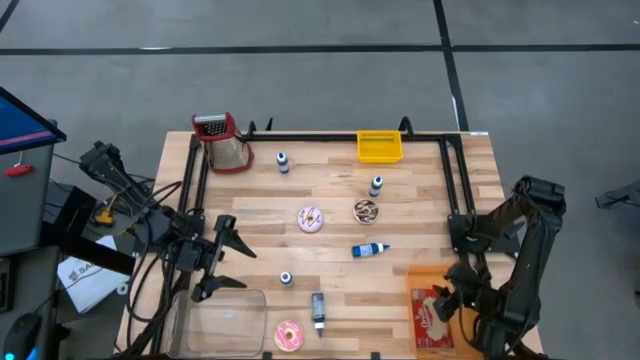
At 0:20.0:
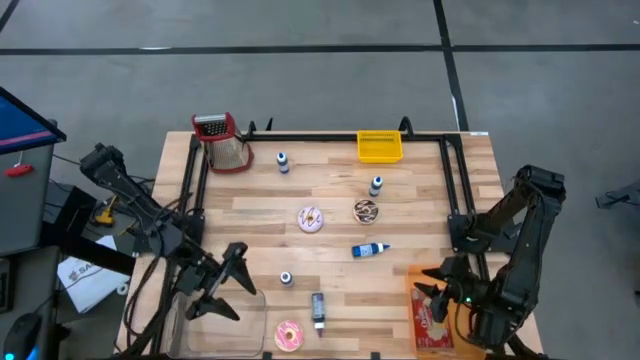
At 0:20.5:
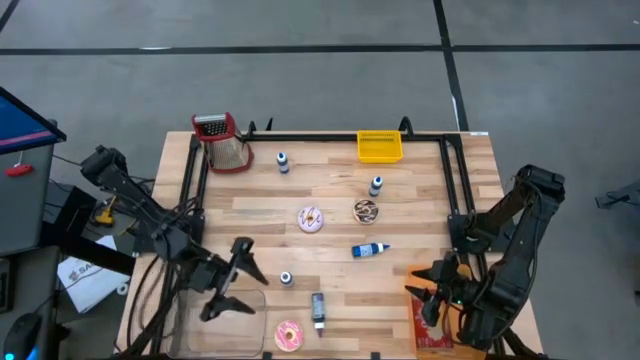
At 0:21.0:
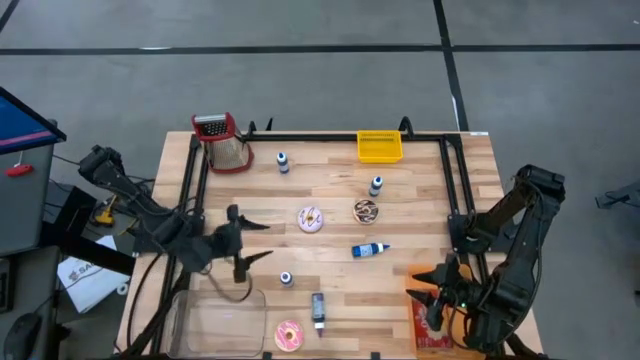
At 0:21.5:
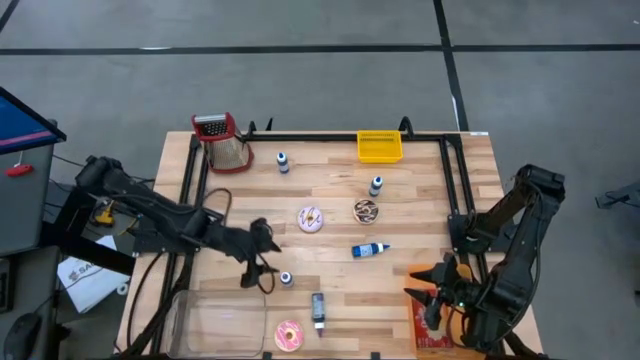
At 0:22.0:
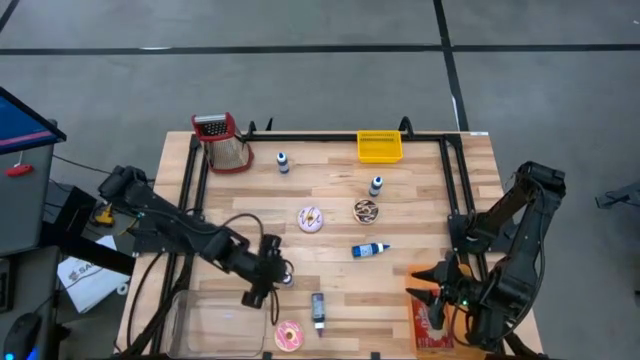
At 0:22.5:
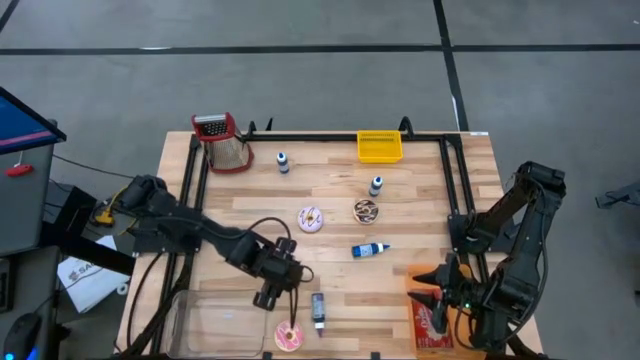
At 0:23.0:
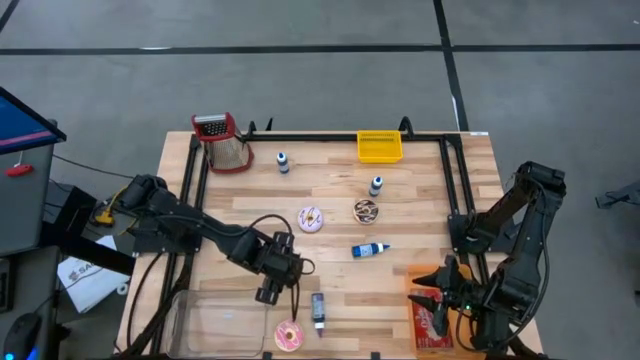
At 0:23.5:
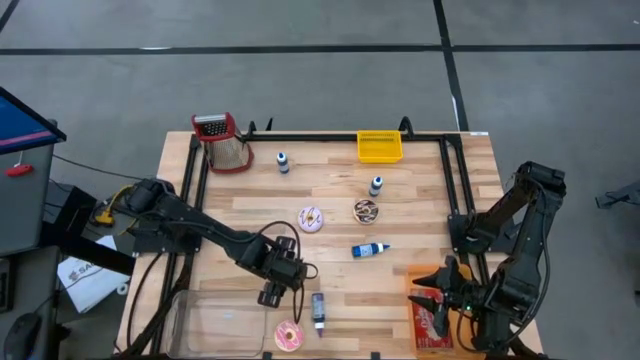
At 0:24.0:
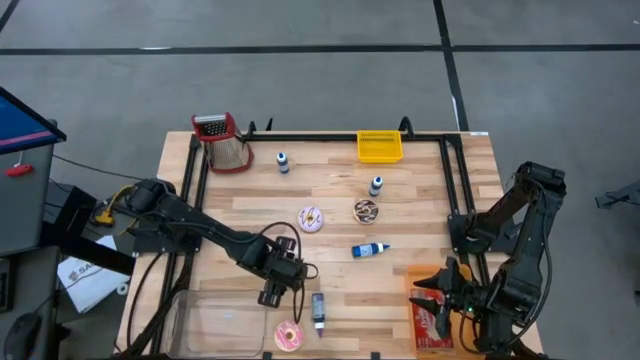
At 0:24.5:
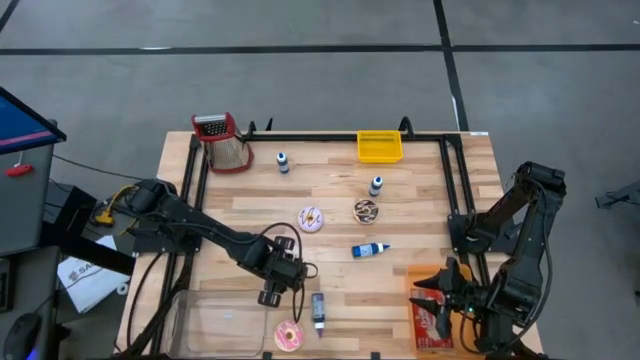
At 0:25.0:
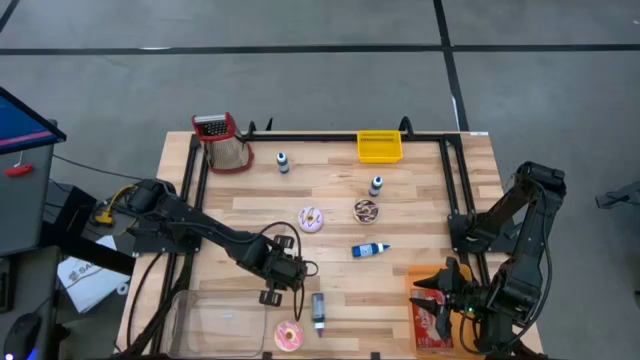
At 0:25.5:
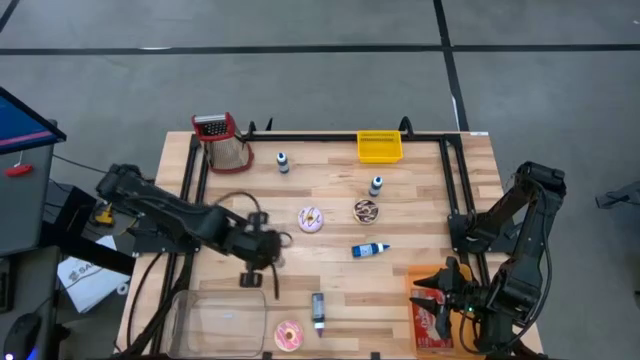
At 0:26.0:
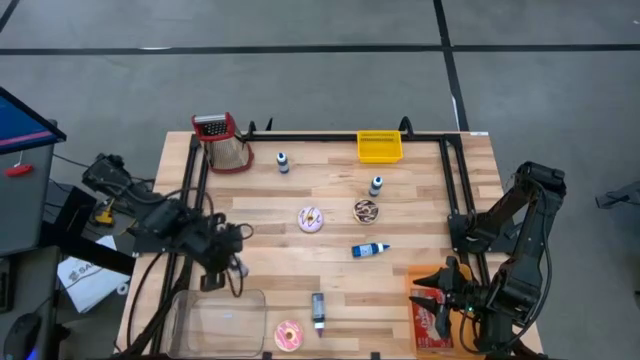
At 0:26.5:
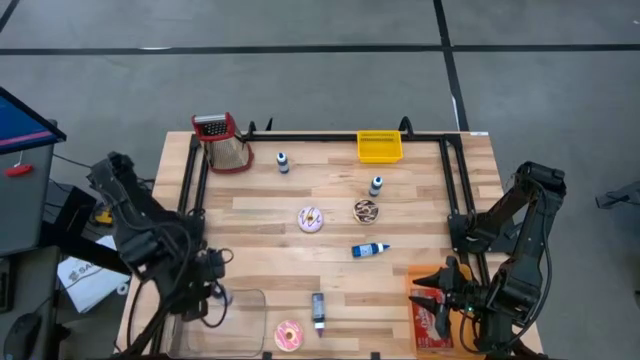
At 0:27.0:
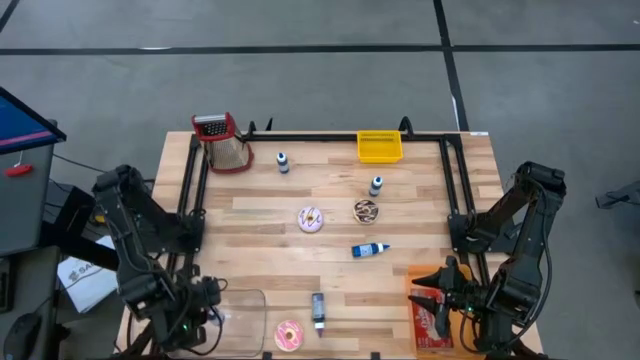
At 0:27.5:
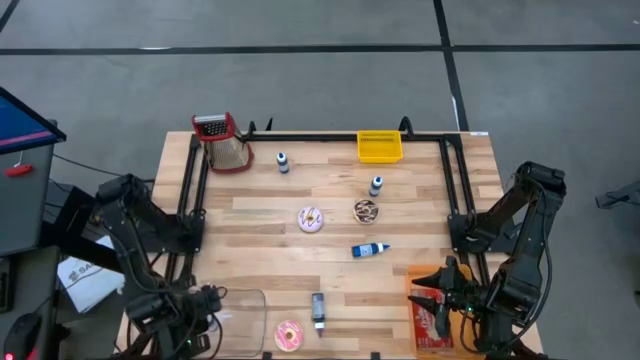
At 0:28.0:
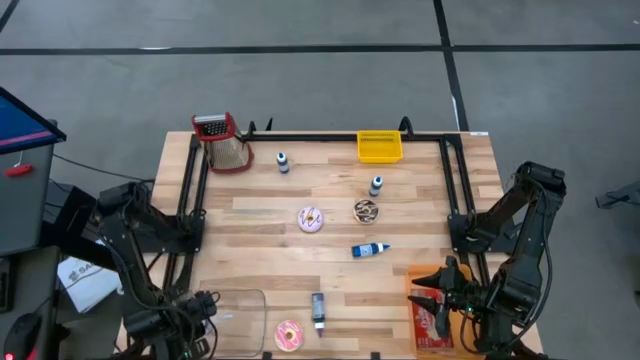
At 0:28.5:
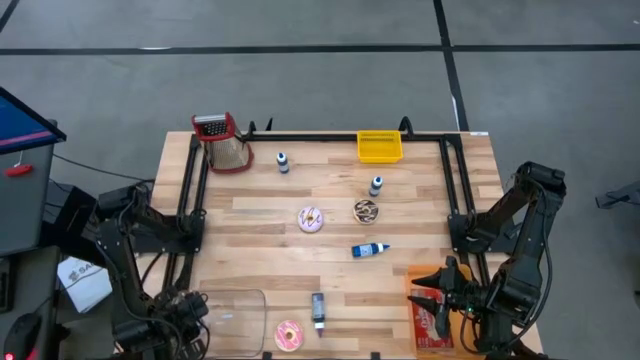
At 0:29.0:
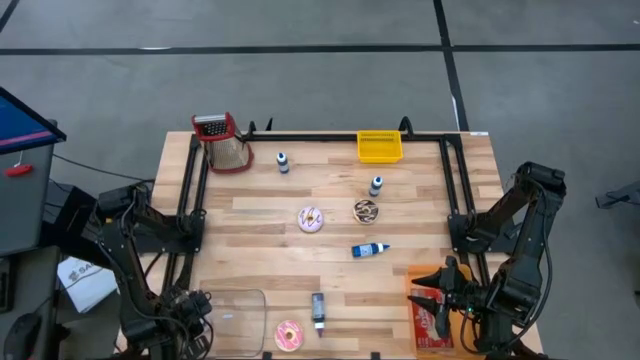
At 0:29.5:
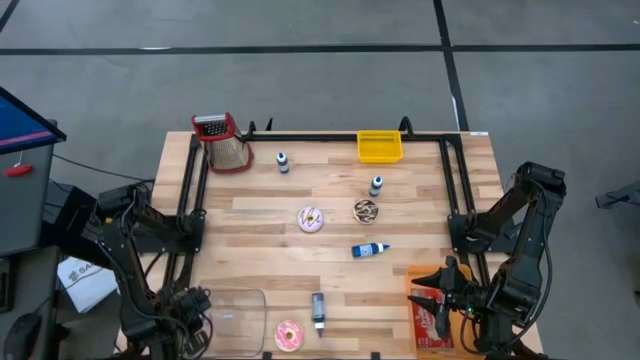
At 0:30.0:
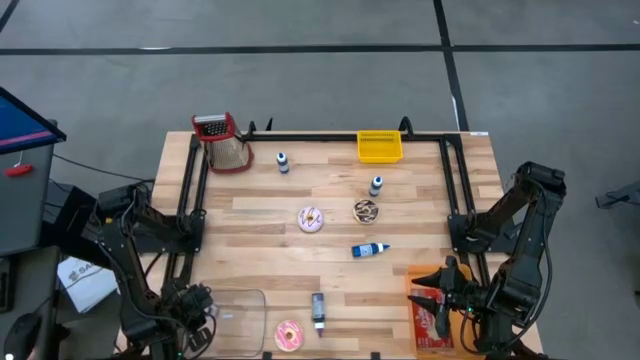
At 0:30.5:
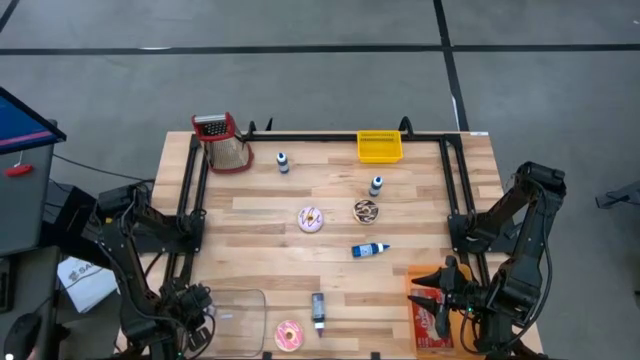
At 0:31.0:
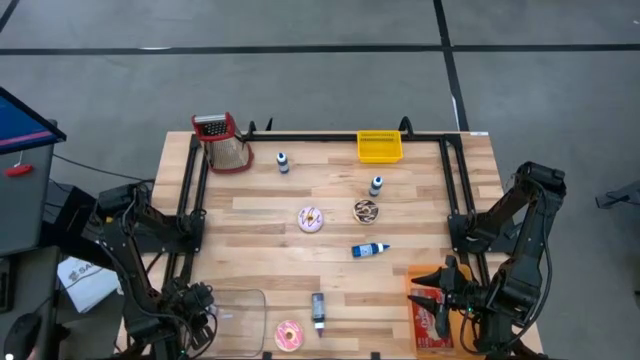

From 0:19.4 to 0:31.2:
Put the top violet food coloring bottle into the transparent bin

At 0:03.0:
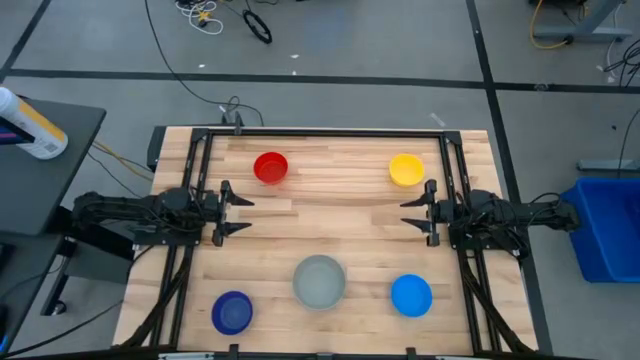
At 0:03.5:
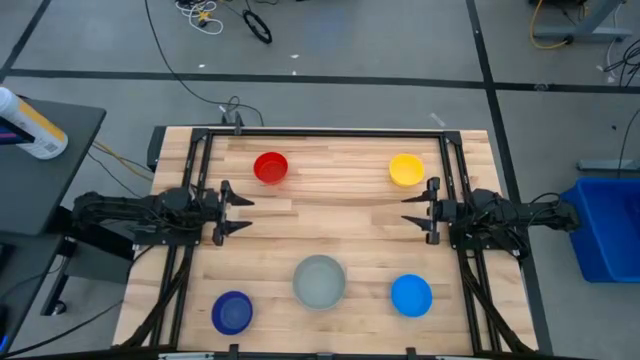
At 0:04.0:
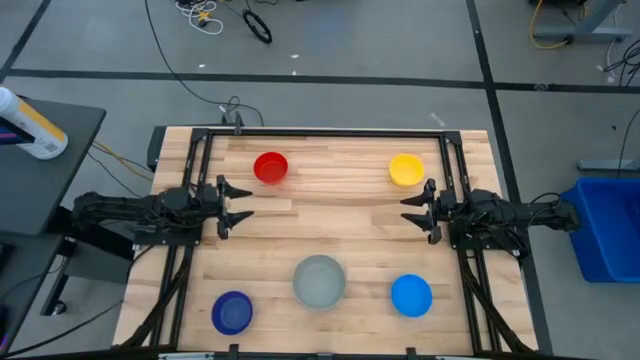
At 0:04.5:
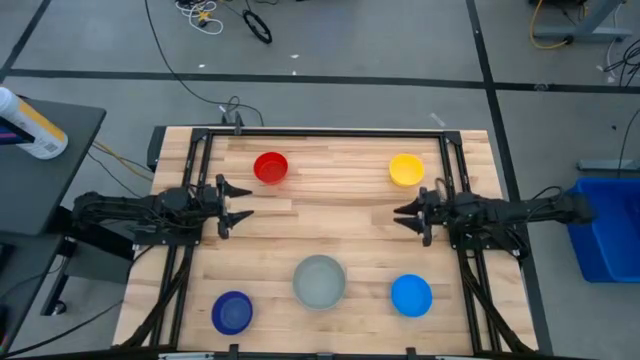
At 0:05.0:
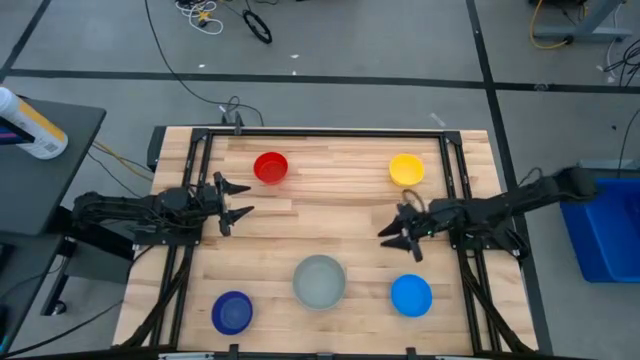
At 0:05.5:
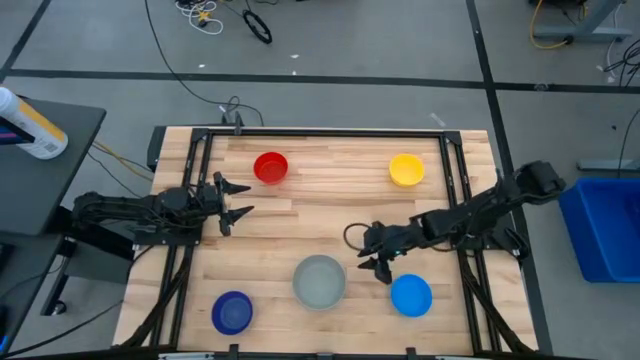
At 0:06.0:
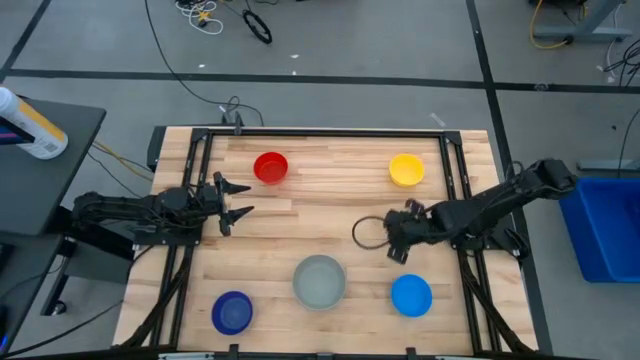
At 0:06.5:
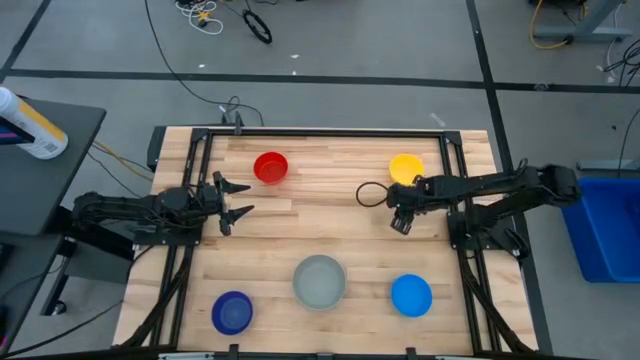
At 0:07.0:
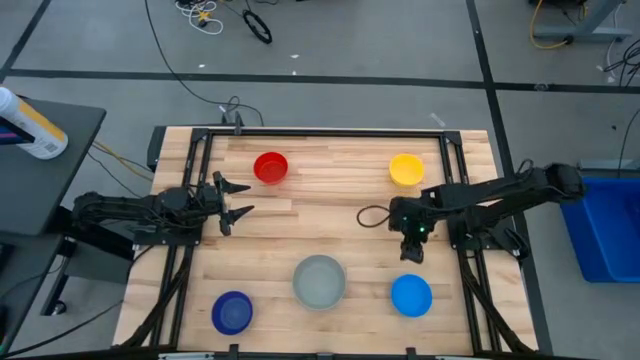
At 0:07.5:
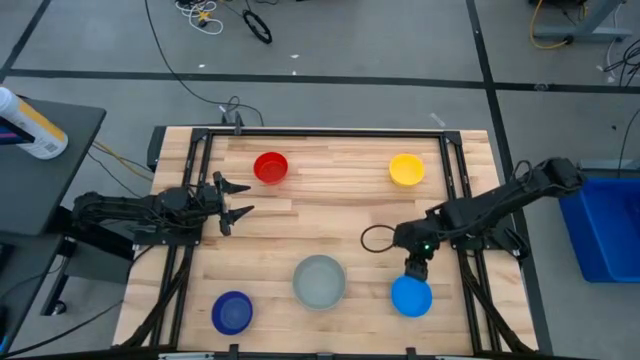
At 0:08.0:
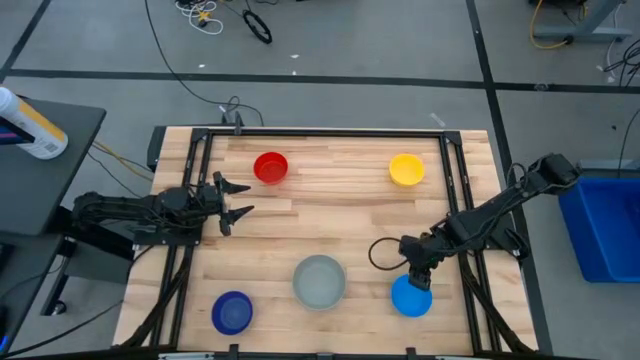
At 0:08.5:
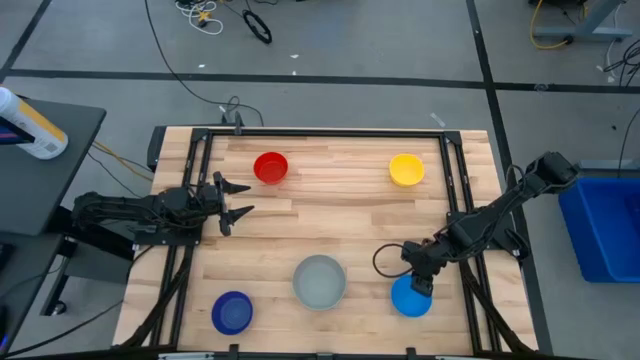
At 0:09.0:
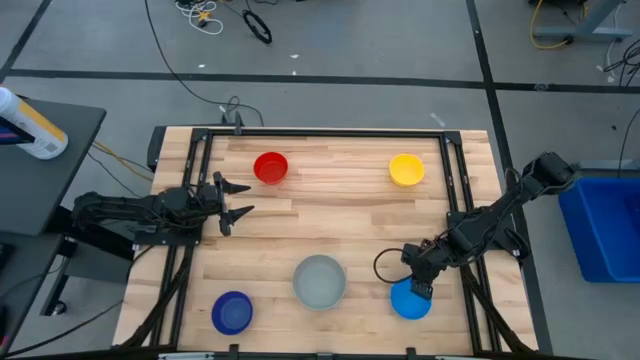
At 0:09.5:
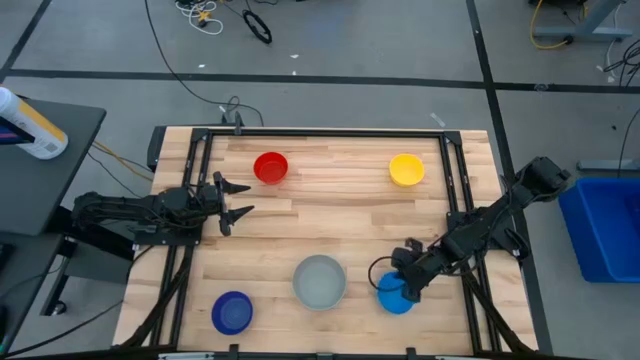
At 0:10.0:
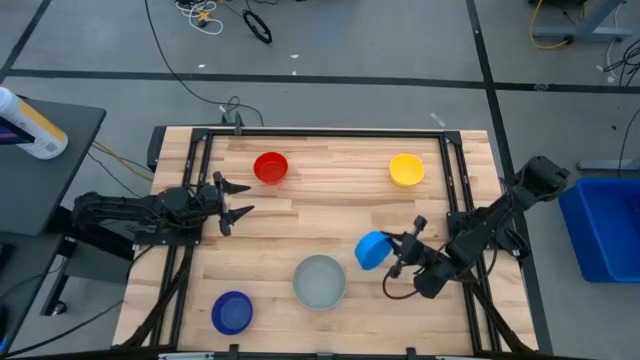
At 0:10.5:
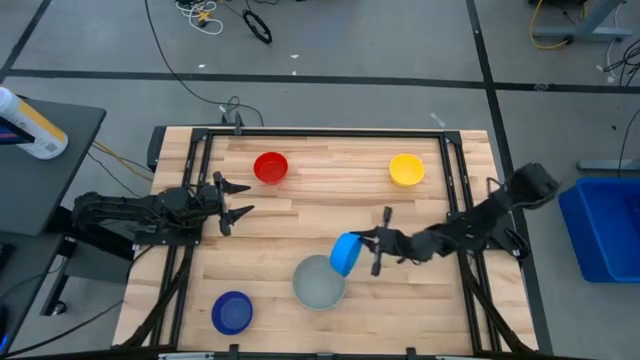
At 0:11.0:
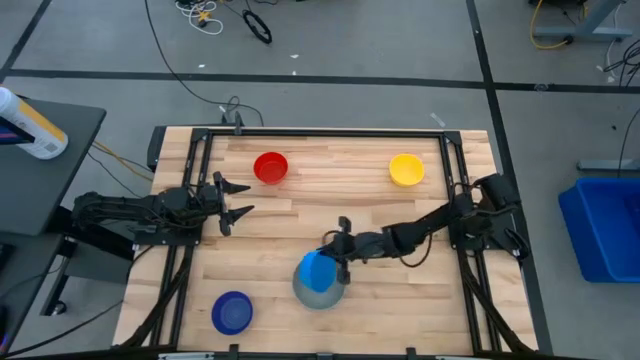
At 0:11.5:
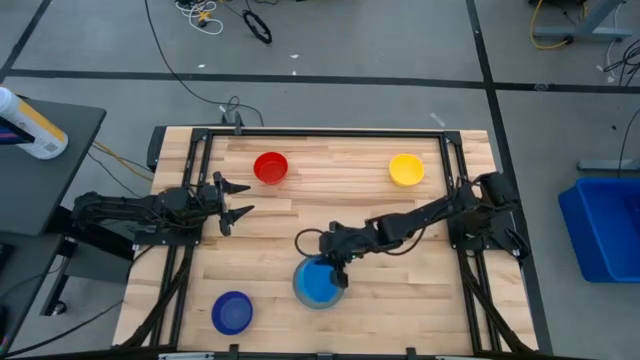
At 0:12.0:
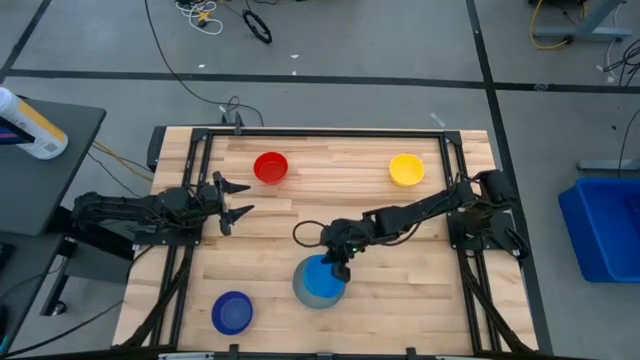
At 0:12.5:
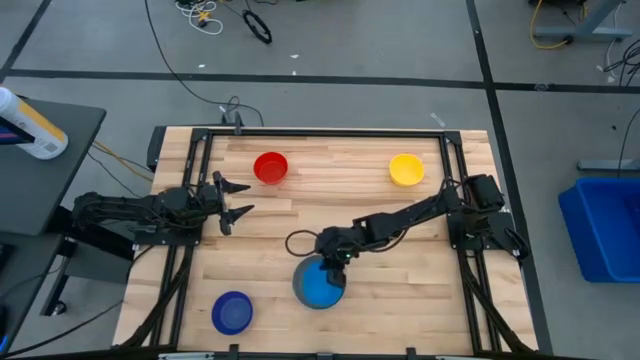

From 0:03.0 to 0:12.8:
Stack the blue bowl on top of the gray bowl
